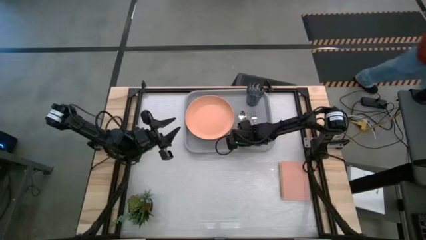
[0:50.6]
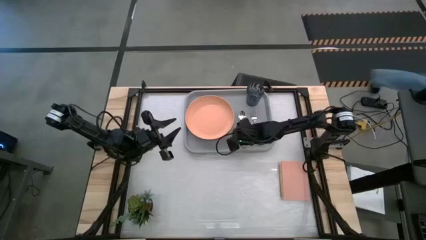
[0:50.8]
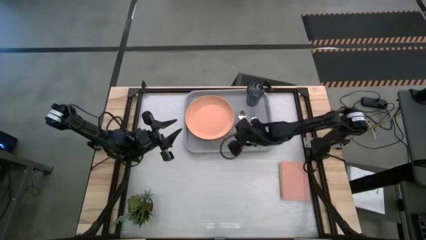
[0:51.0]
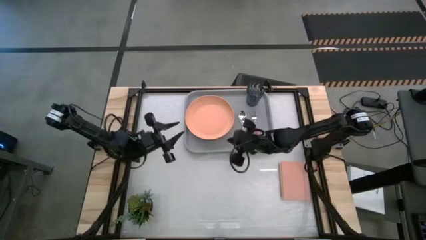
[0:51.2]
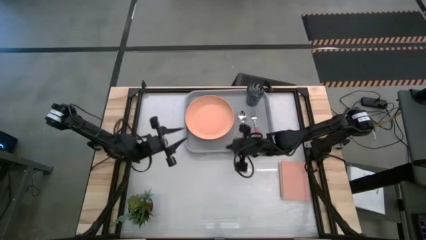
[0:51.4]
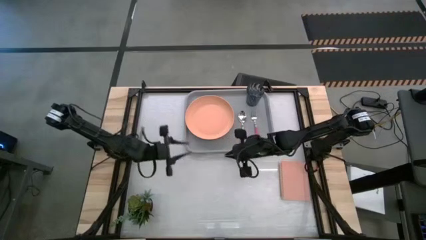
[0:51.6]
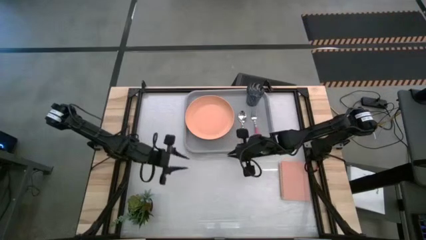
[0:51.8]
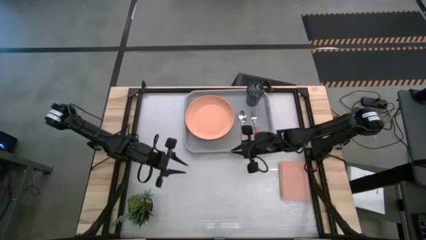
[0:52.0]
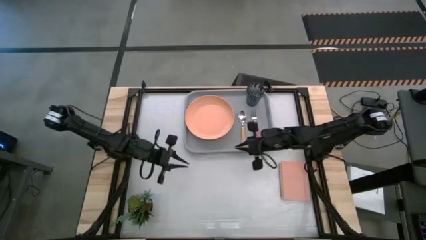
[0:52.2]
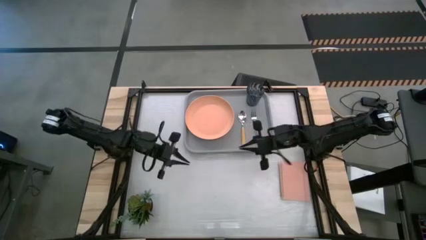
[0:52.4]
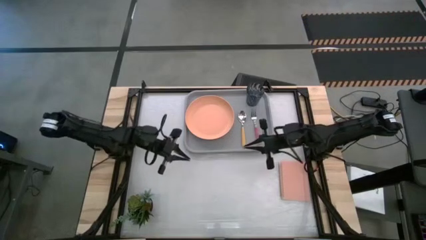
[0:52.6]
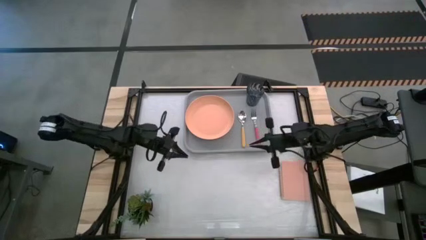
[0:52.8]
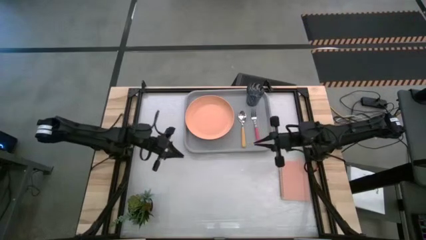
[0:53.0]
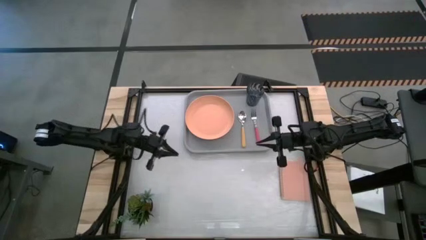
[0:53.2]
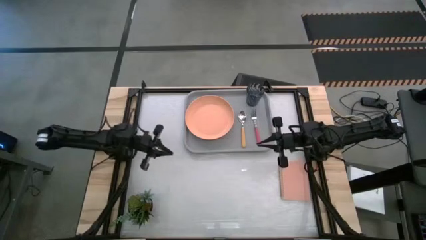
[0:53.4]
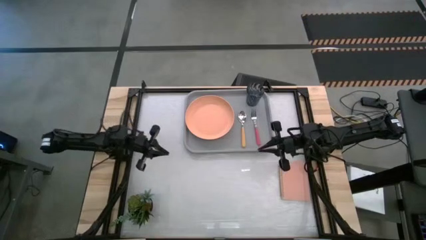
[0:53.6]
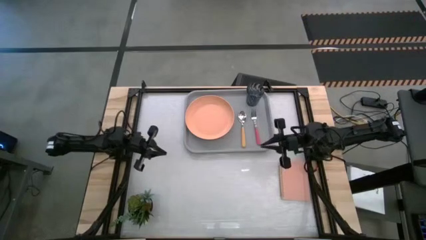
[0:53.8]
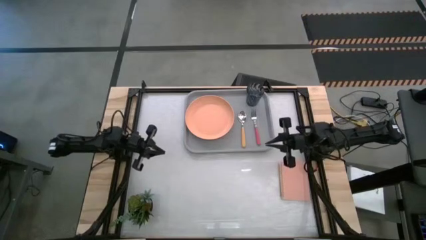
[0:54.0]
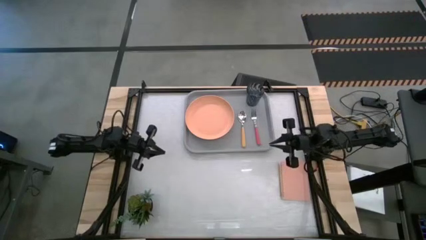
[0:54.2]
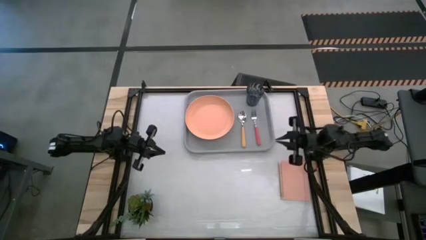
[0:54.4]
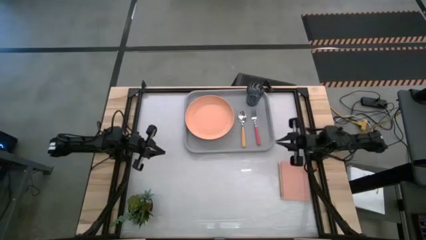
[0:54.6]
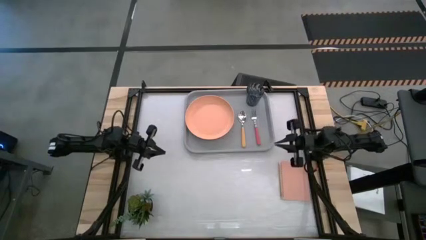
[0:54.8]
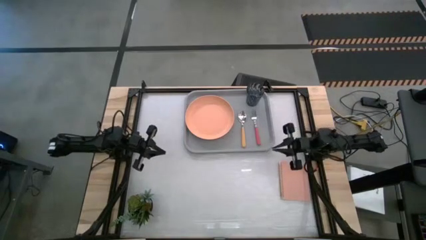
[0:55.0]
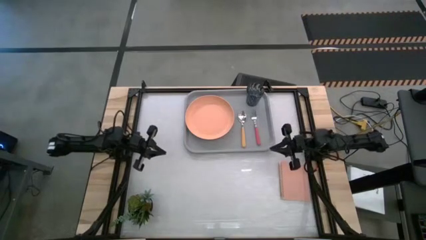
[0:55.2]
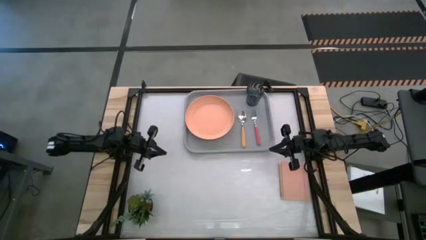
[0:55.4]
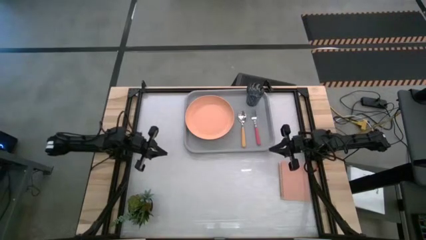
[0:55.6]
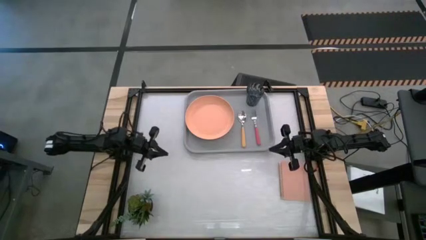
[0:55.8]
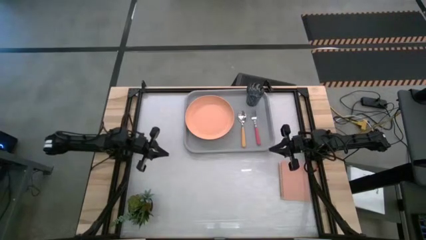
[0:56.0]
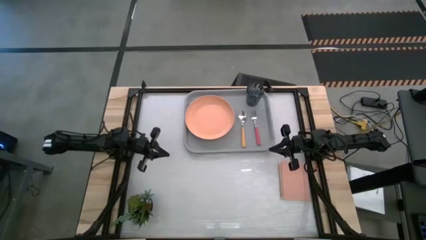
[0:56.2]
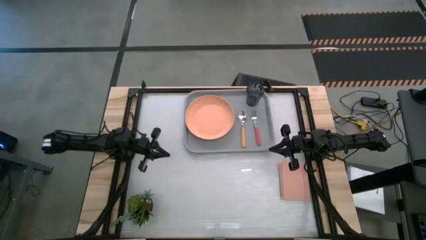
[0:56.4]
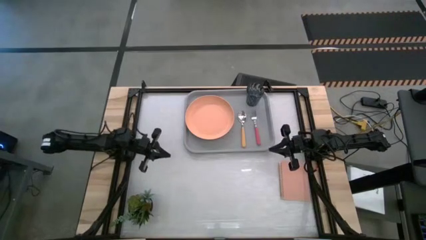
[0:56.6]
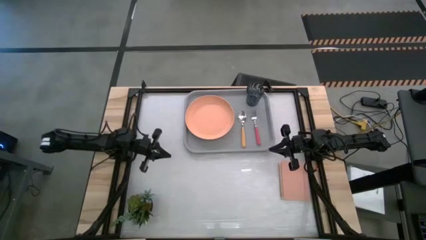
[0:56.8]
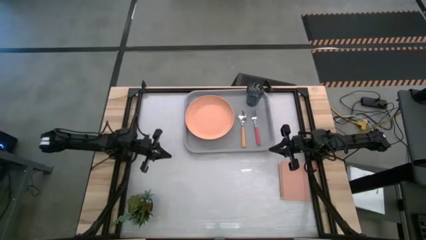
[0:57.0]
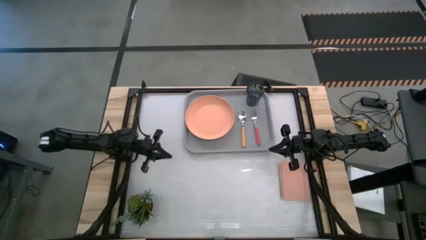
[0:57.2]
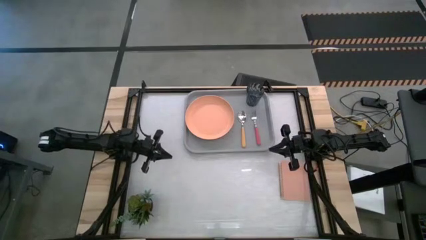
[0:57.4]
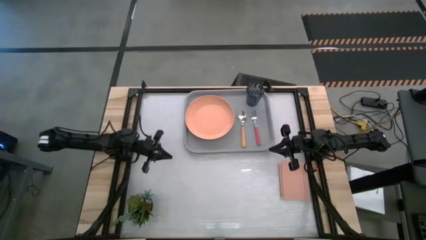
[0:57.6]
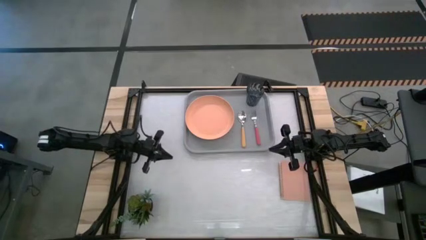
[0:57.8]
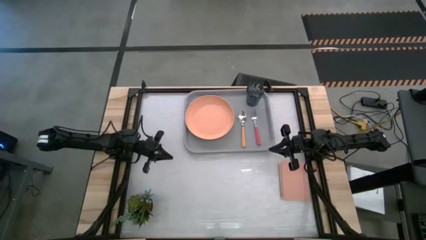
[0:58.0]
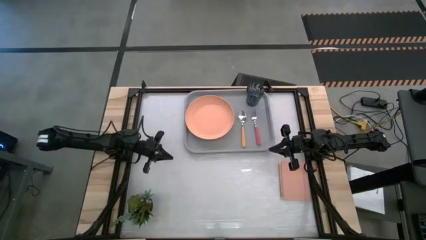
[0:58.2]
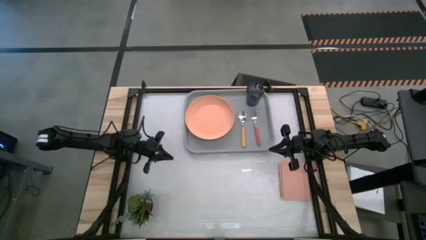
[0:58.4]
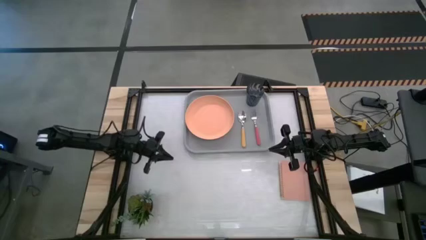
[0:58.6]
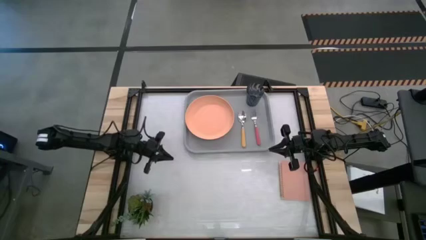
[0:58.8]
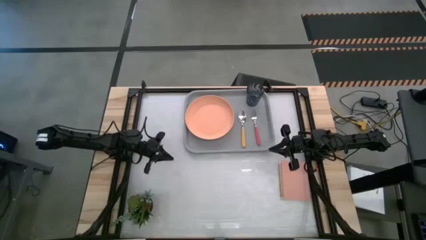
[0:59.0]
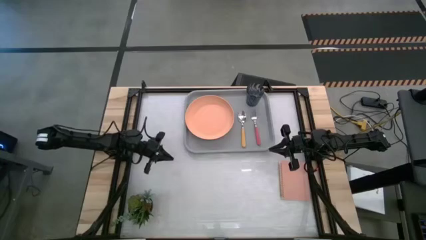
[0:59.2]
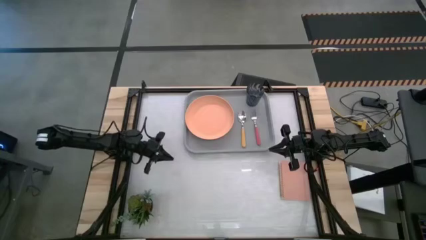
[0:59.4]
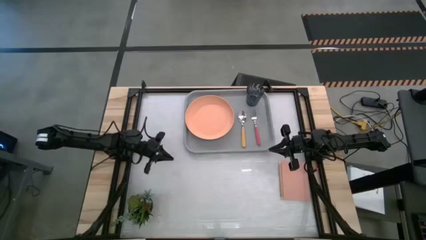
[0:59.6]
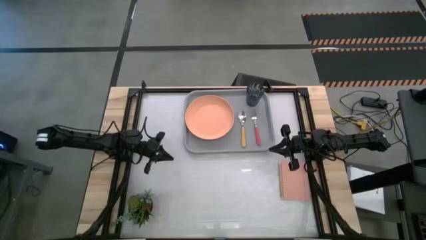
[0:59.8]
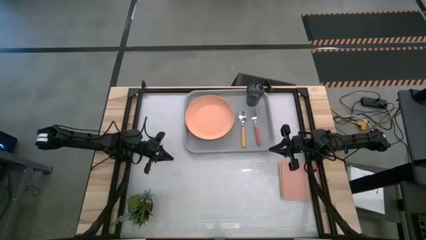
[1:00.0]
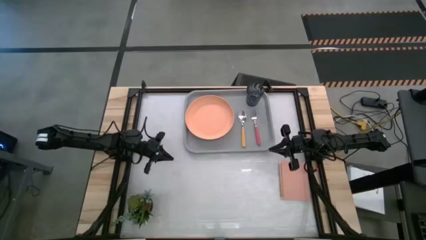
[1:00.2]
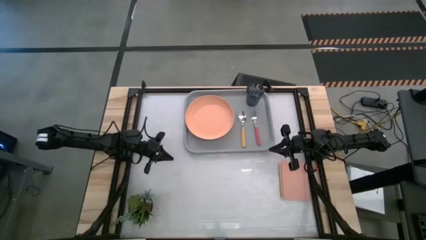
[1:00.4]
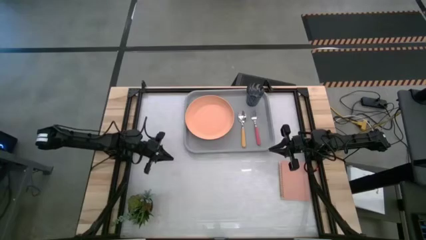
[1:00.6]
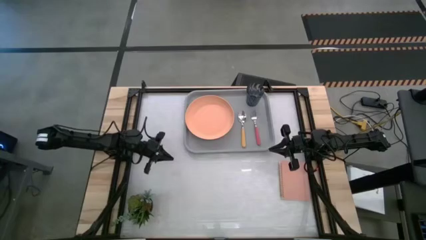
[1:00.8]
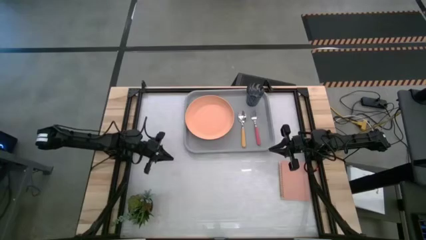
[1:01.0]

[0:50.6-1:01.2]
Task: Pick and place plate/cup/fork/spoon on tray
Return to Home Position

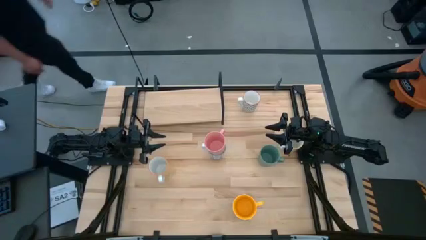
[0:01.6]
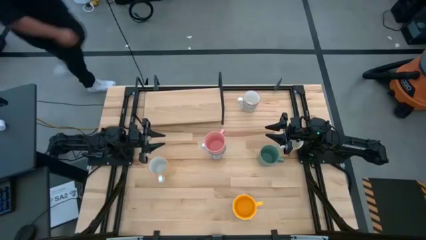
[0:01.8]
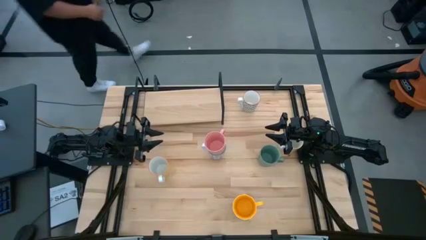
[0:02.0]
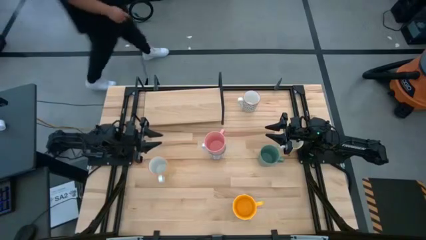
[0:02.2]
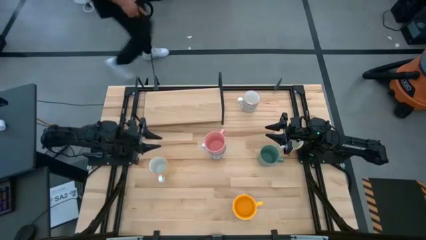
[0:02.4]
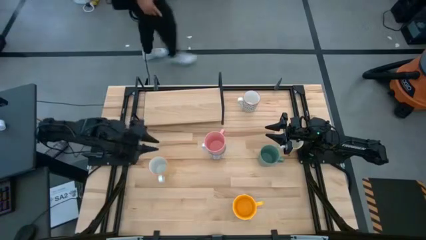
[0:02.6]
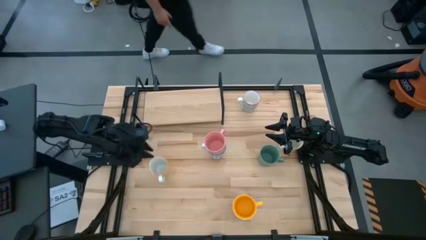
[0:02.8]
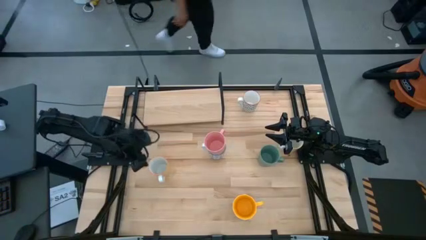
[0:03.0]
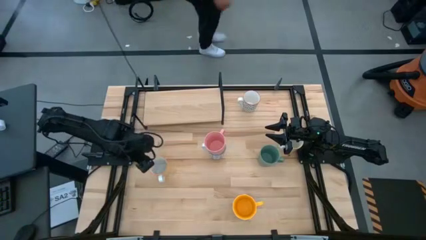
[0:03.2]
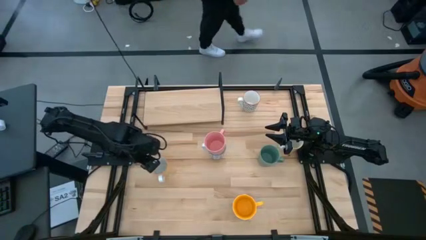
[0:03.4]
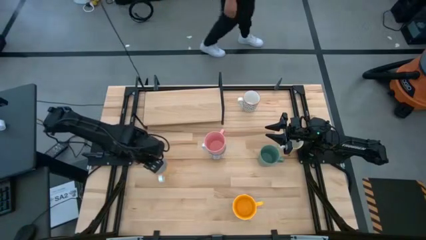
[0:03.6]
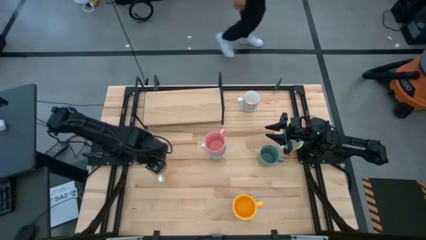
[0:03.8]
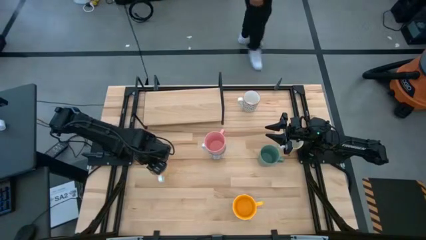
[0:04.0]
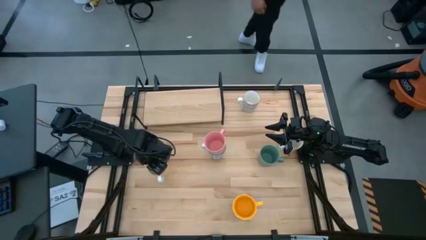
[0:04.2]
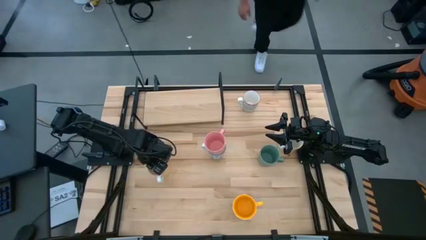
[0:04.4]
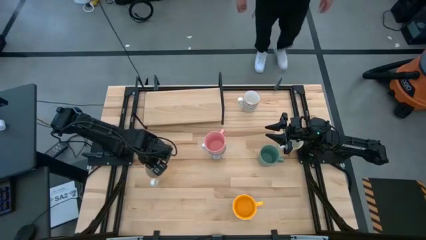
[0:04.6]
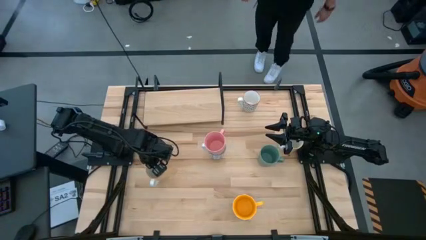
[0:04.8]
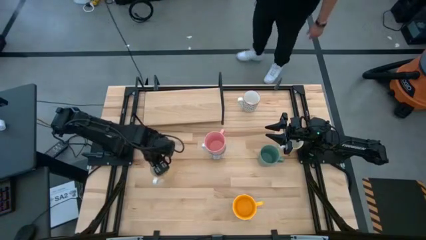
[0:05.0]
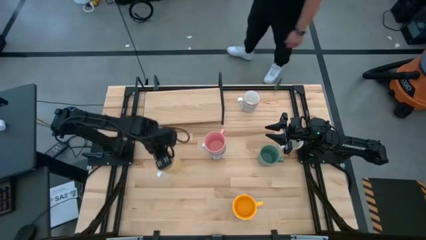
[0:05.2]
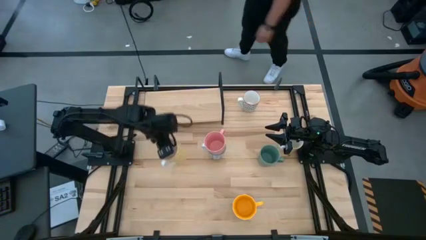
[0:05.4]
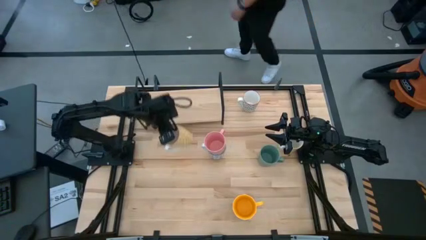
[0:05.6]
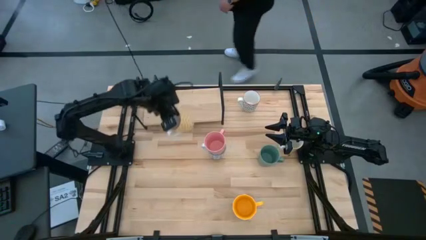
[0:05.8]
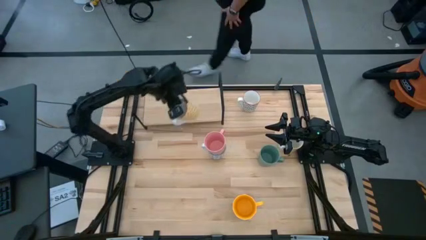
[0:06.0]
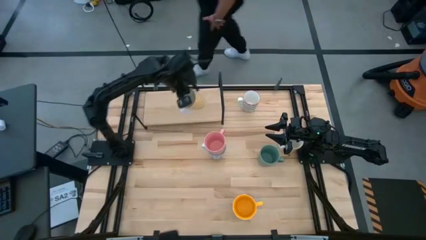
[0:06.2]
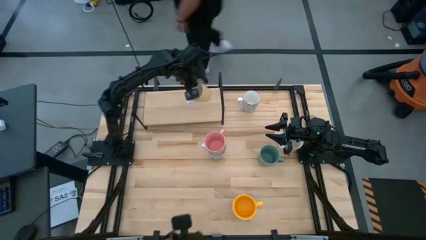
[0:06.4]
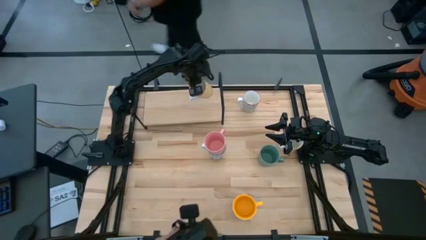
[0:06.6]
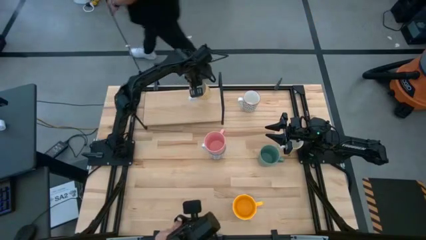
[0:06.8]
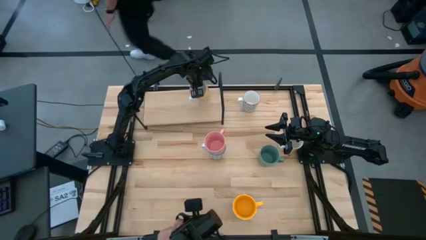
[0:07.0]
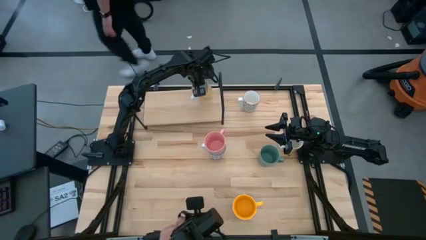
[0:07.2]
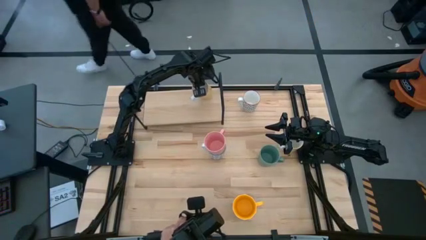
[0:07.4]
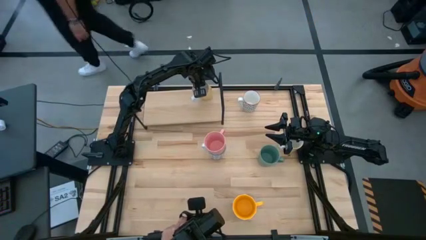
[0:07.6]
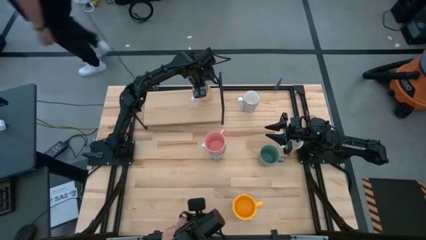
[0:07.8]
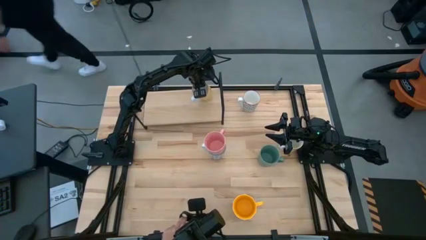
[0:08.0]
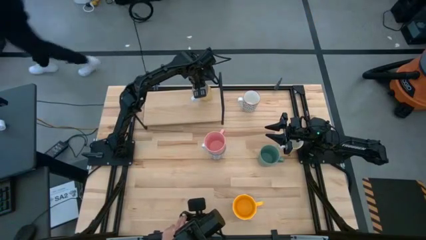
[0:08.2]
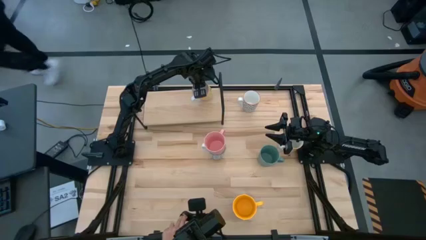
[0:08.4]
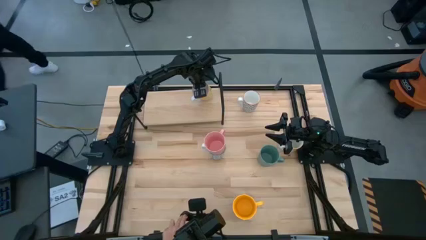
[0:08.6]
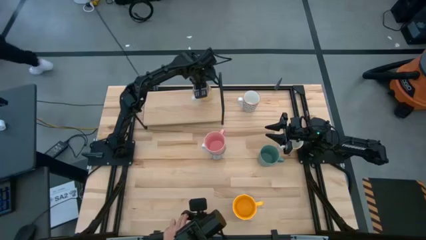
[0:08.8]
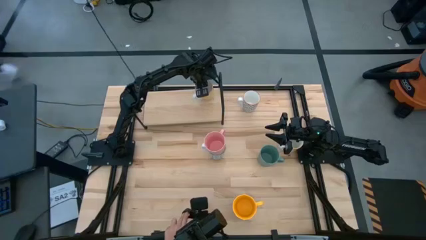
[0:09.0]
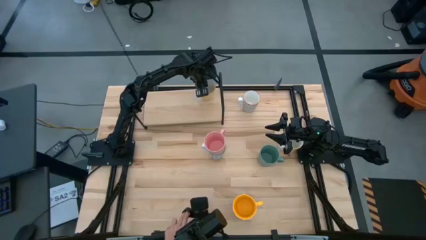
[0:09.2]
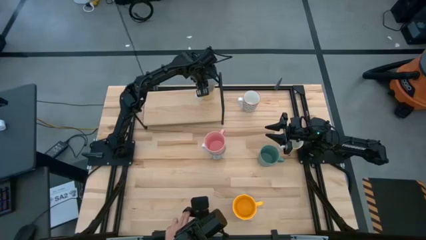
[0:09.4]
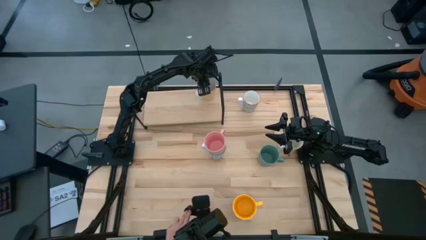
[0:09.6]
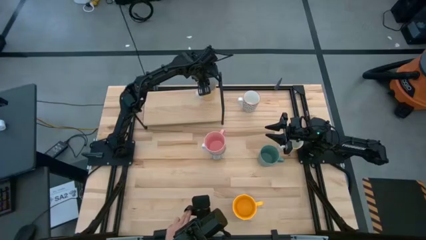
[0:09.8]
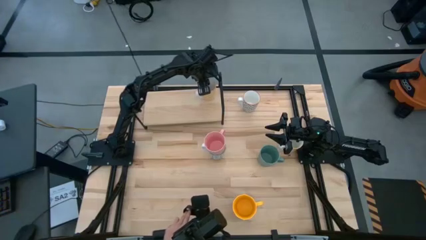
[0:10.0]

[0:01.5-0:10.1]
Task: Place coffee mugs
Put the yellow patterned mug on the shelf
